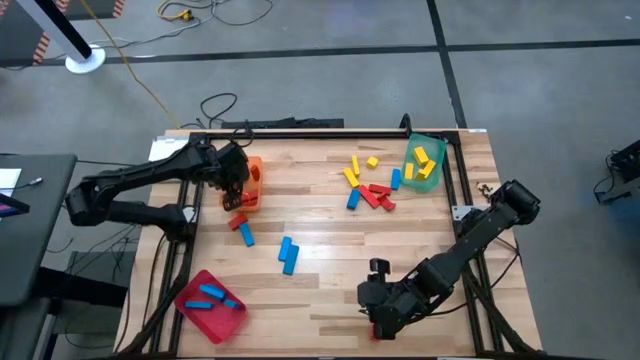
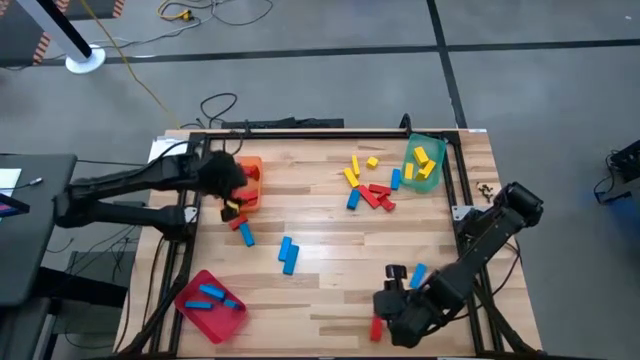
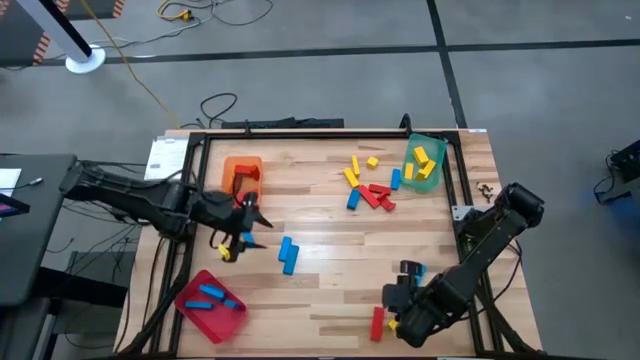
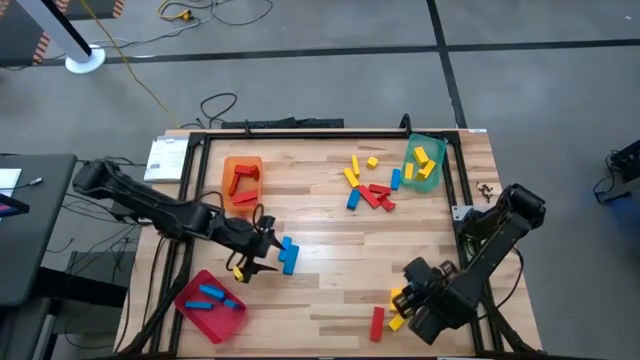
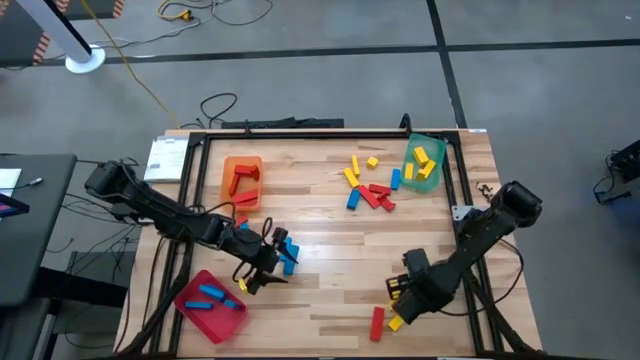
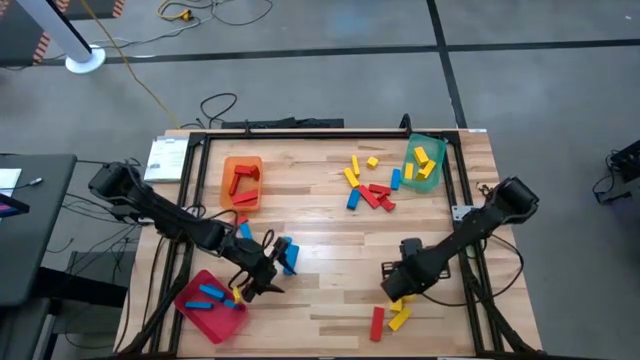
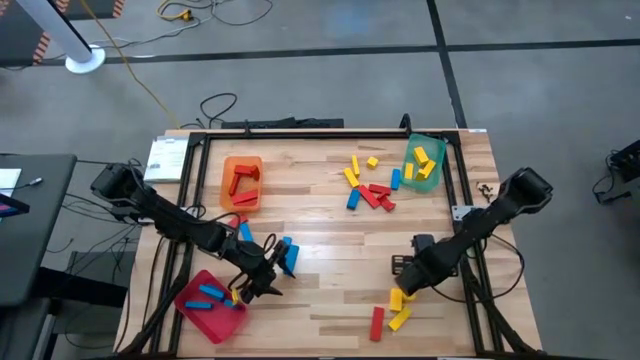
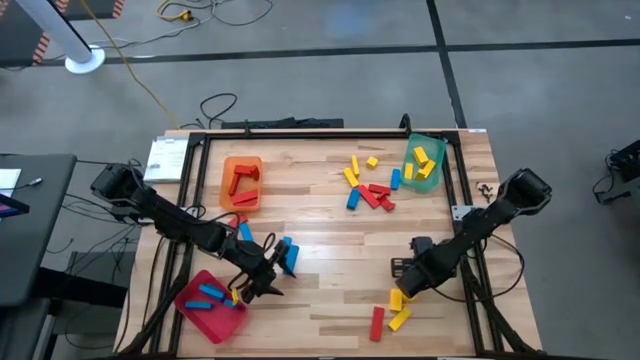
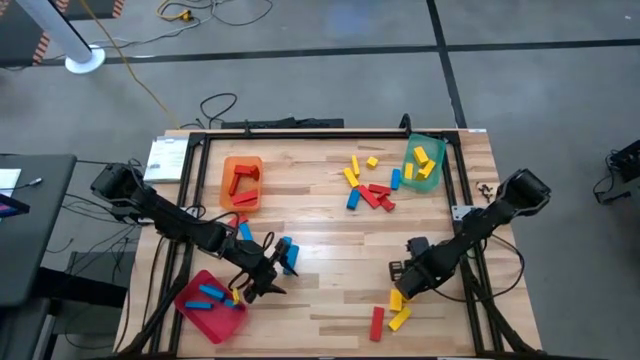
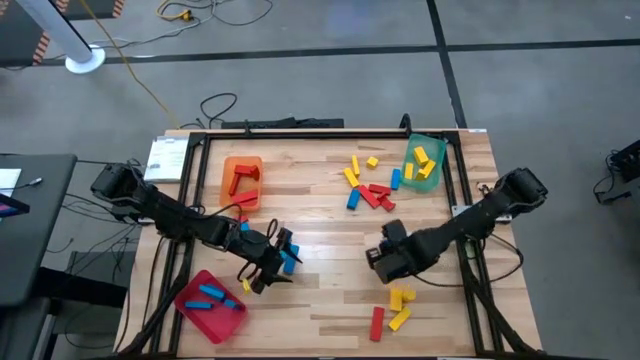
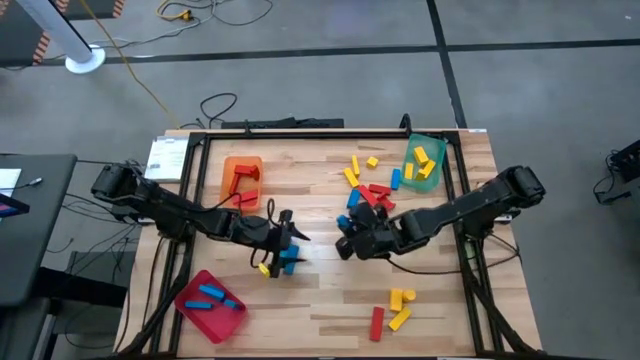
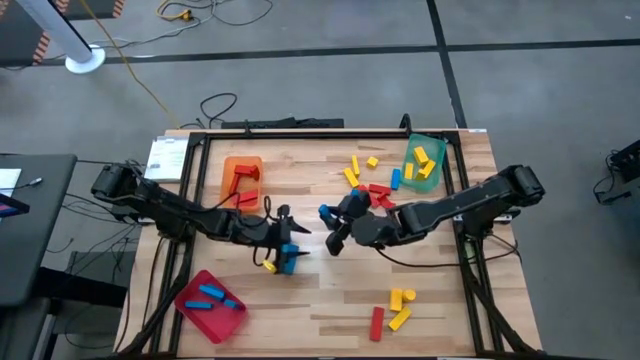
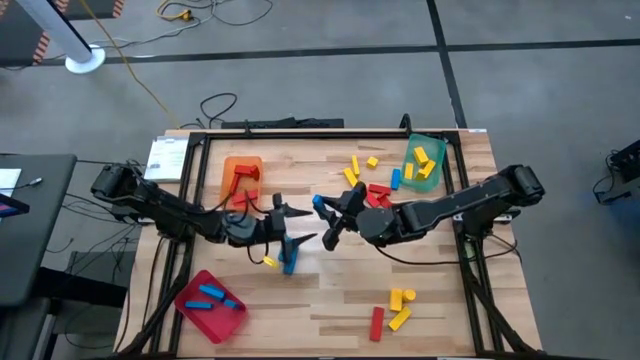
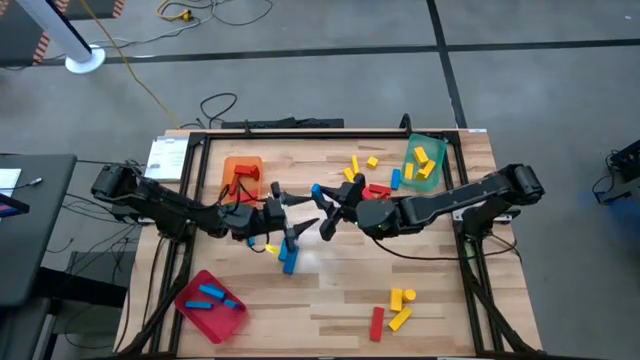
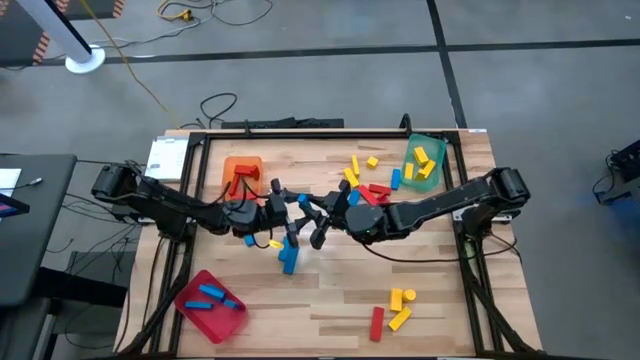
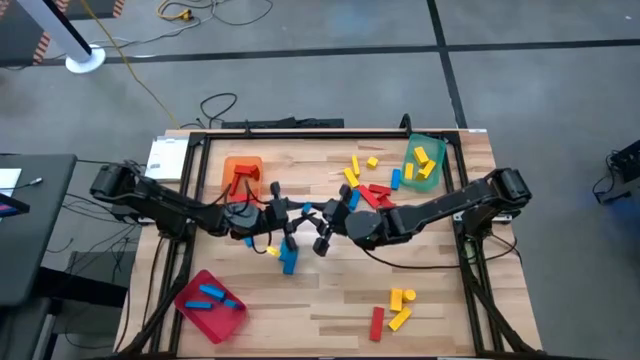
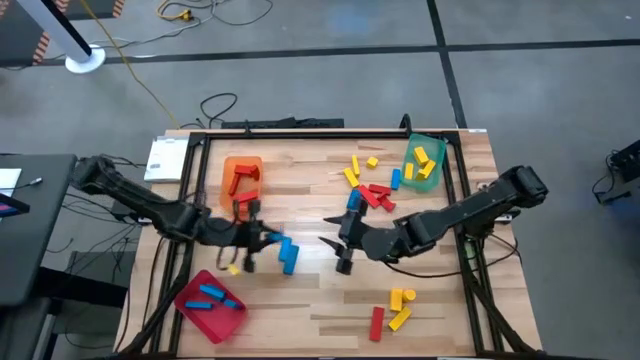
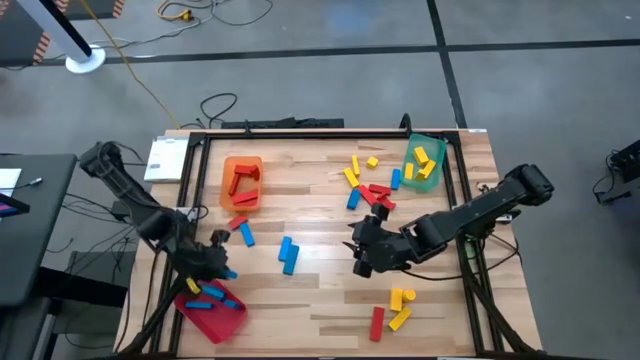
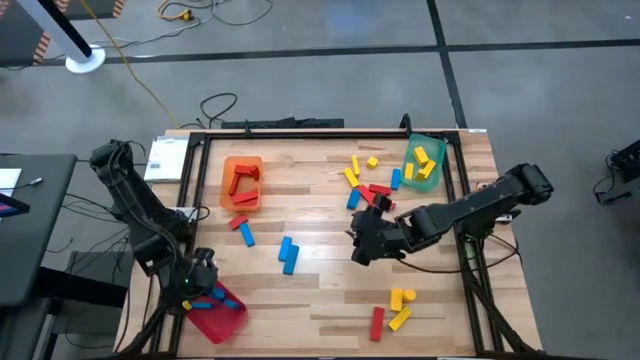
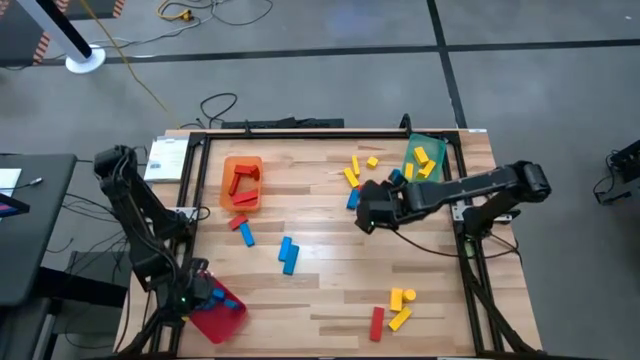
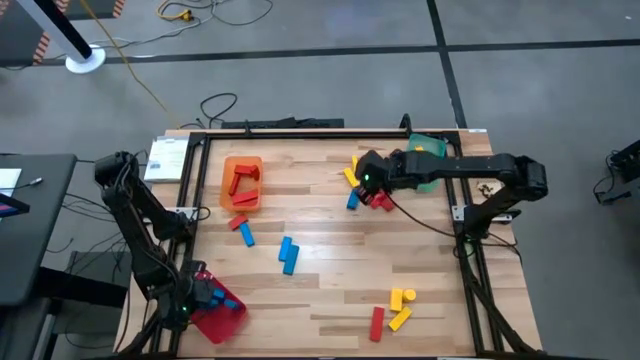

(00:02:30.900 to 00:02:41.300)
Task: Sort blocks
Put the blue wooden block into the red bin

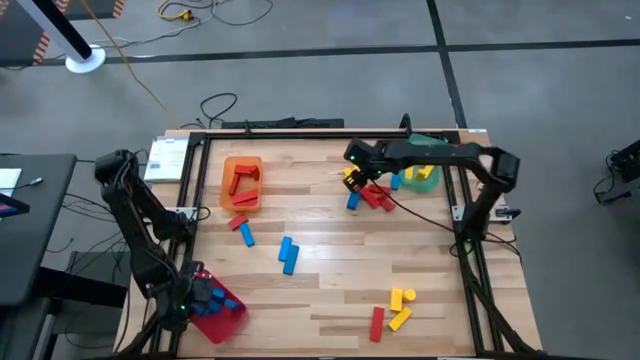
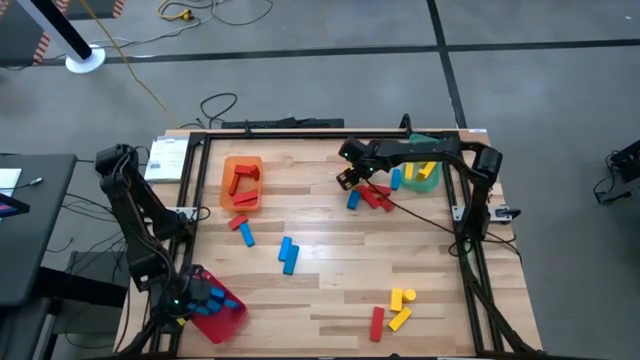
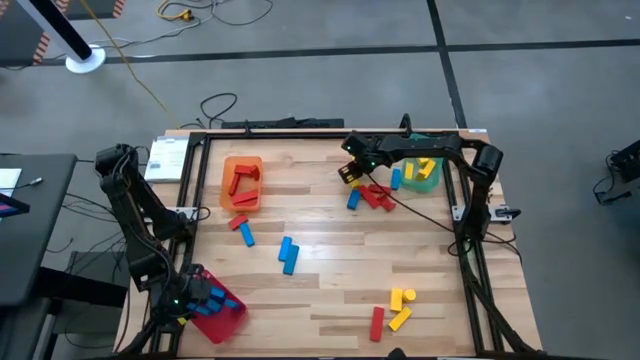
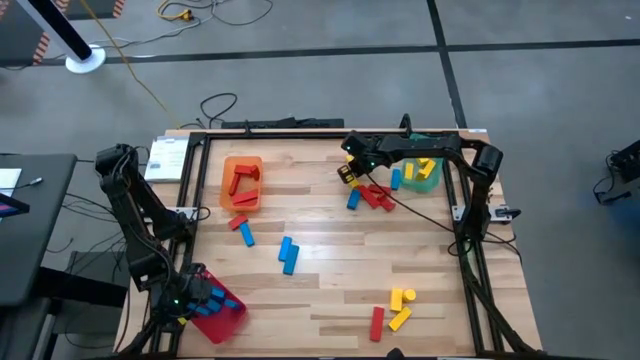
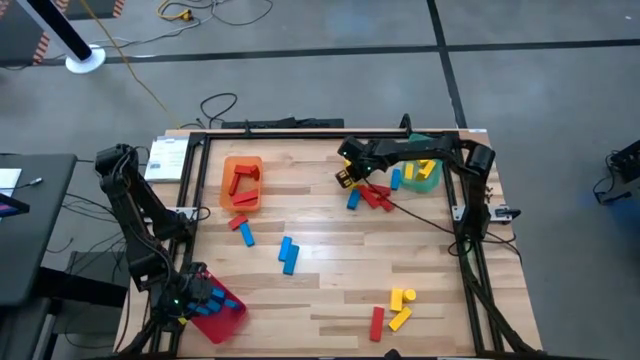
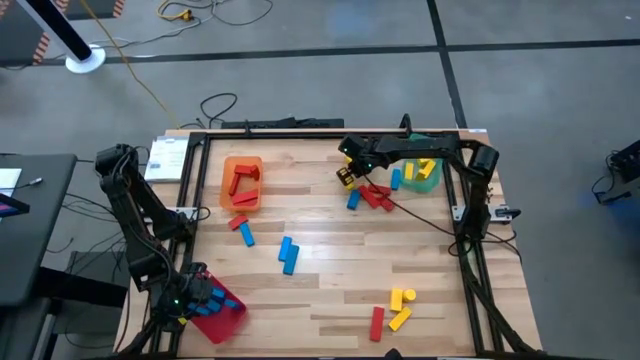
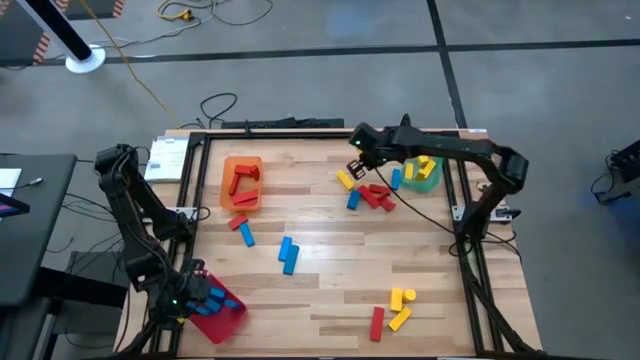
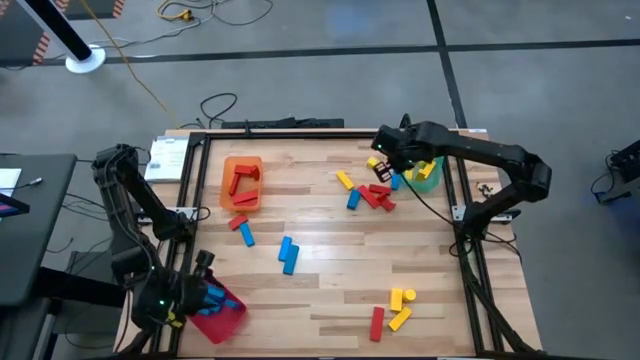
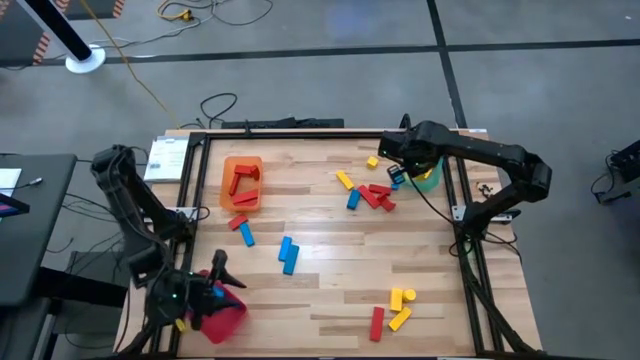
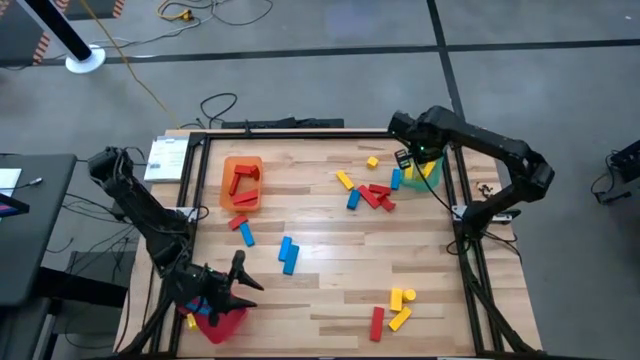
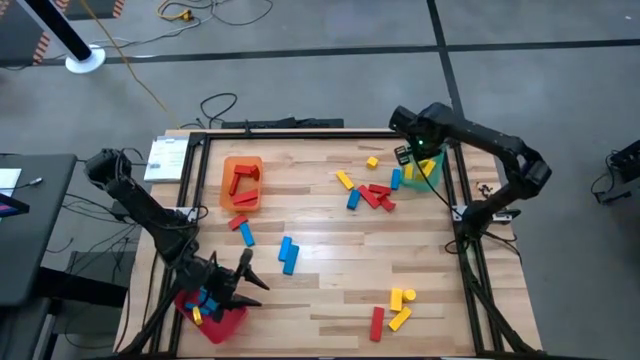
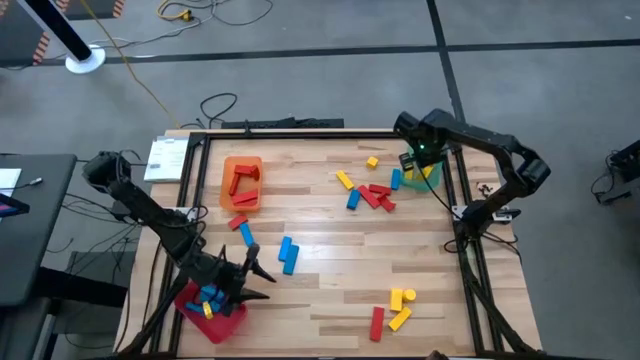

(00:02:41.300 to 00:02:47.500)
Put the yellow wooden block into the green bin
